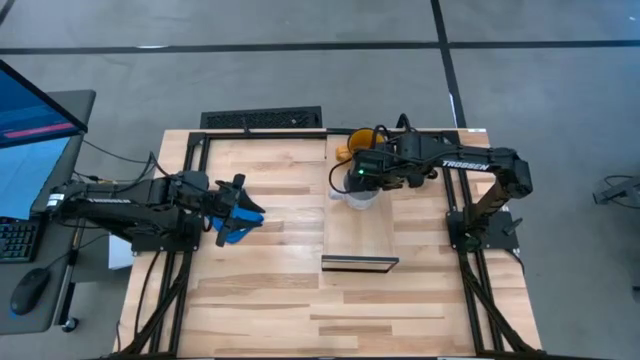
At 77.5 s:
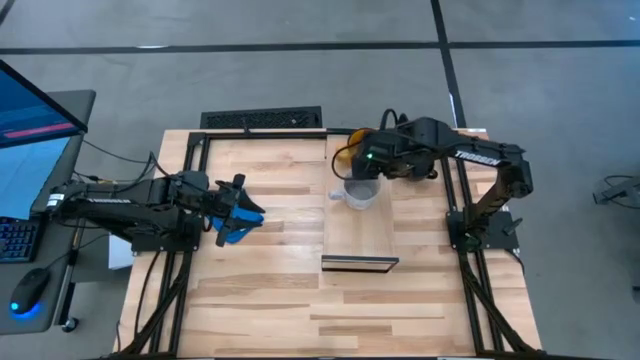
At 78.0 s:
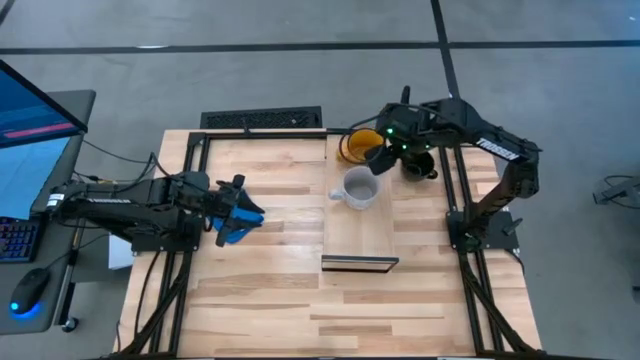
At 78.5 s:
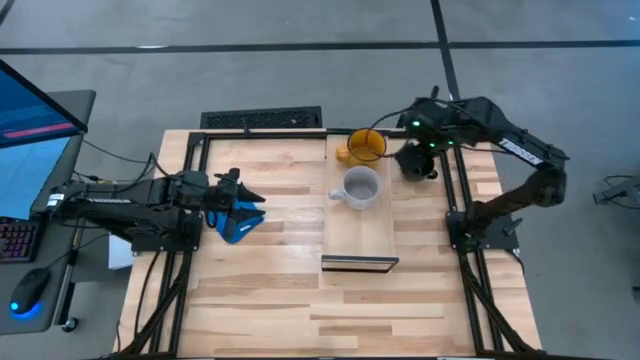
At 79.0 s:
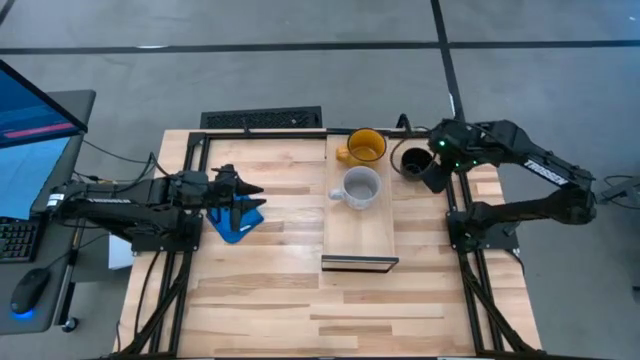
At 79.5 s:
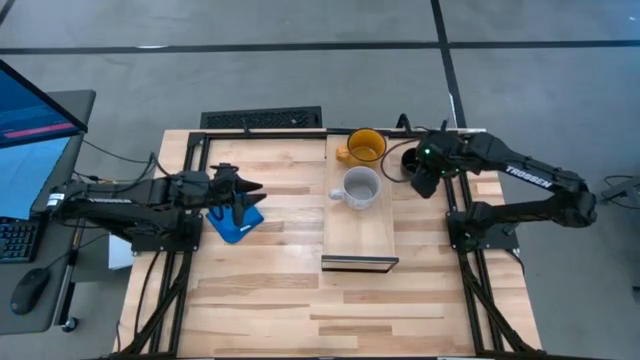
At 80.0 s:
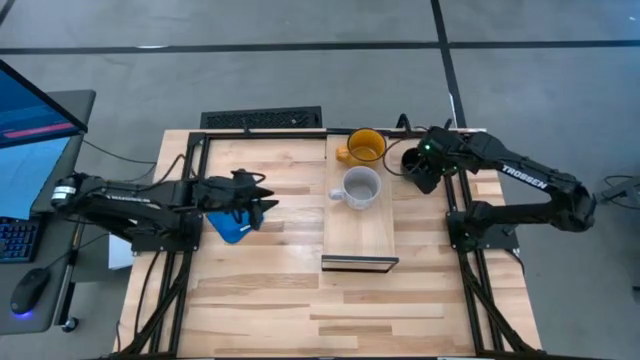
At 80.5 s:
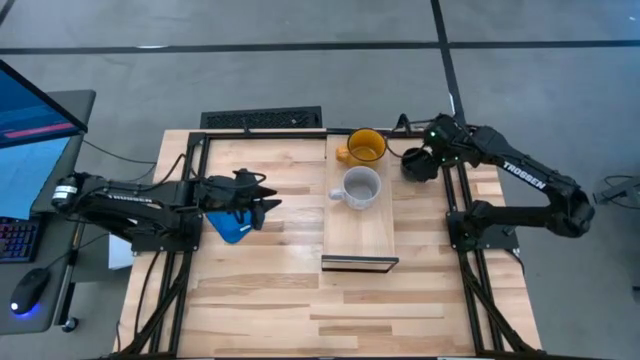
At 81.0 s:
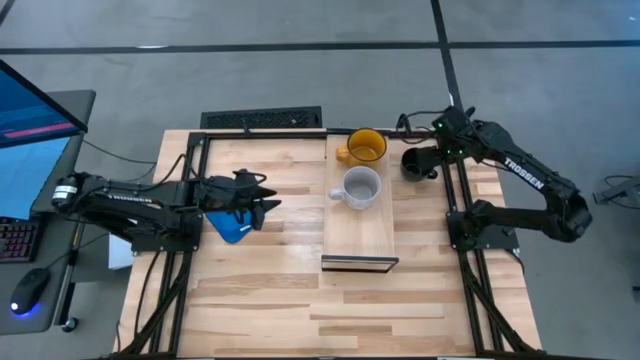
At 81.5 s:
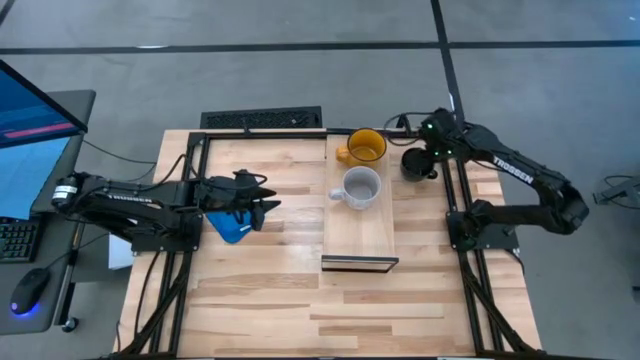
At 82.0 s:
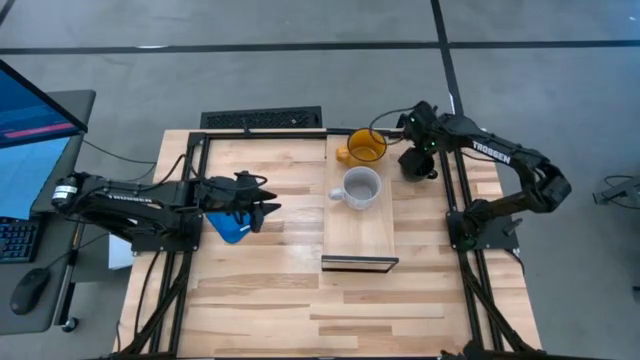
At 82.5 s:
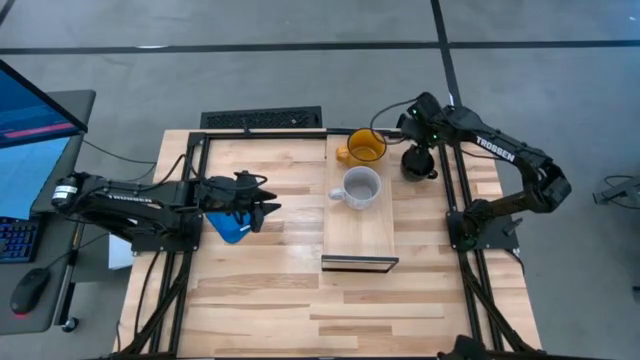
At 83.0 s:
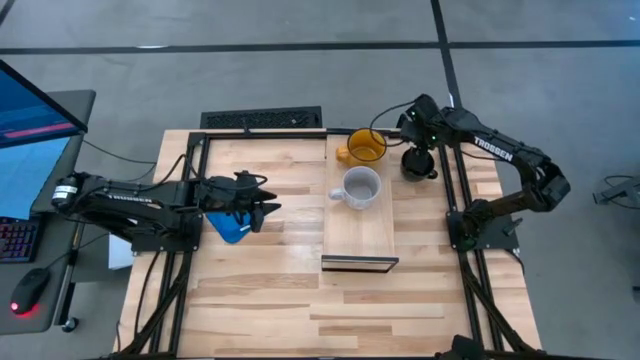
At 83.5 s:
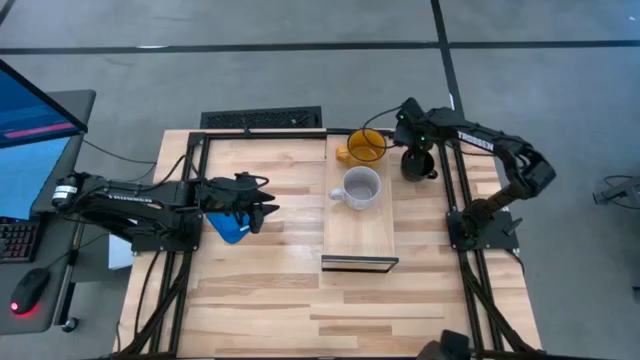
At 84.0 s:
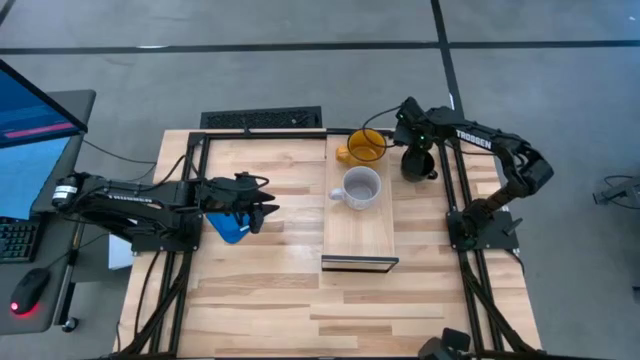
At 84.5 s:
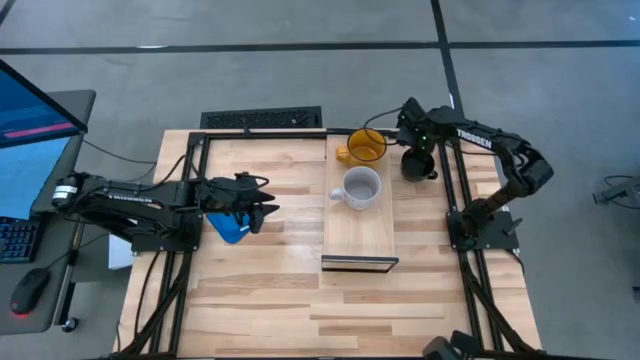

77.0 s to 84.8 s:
Task: Stack small to large cups/mugs on shelf
Put the black mug on the shelf

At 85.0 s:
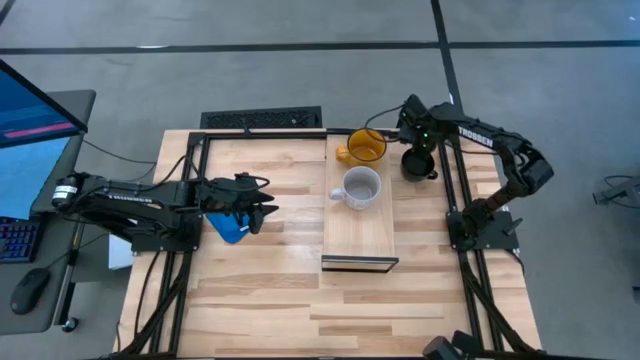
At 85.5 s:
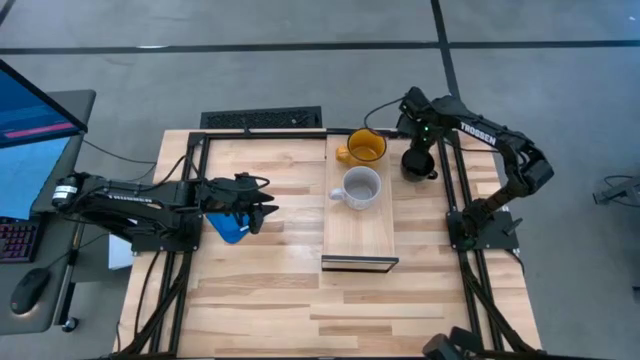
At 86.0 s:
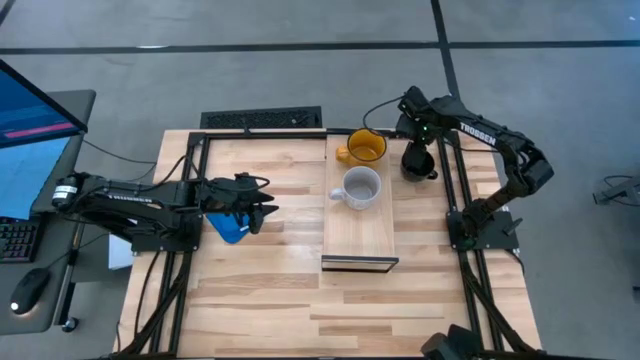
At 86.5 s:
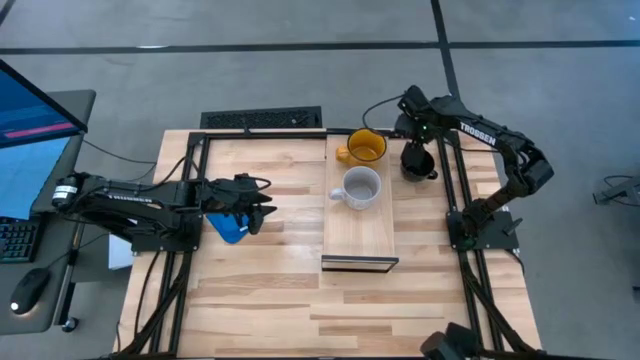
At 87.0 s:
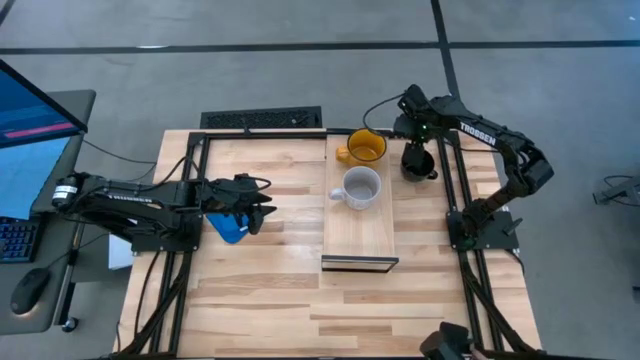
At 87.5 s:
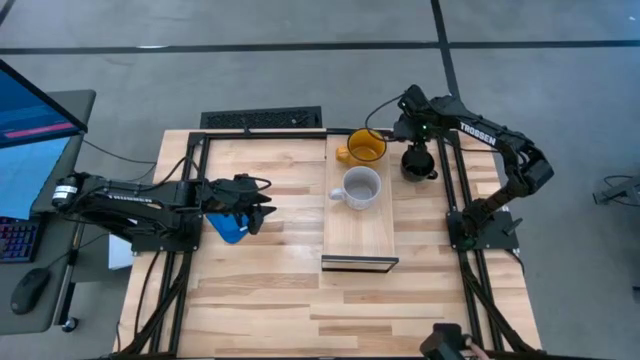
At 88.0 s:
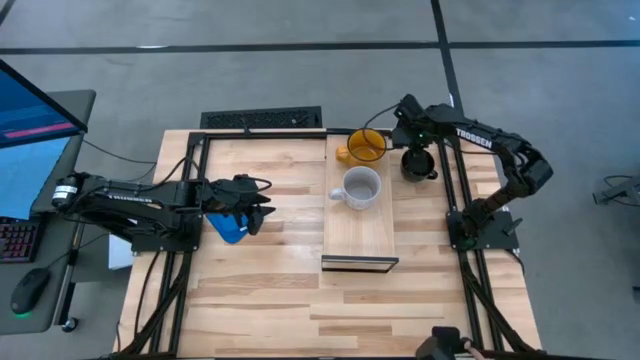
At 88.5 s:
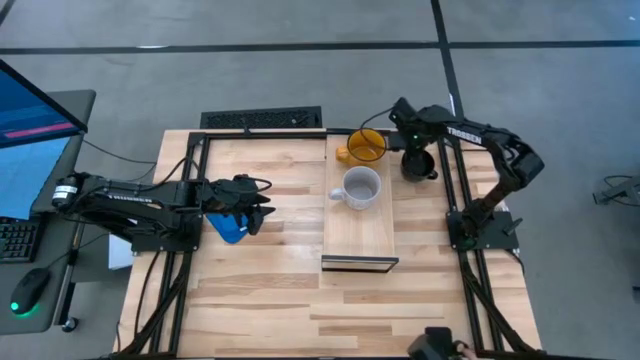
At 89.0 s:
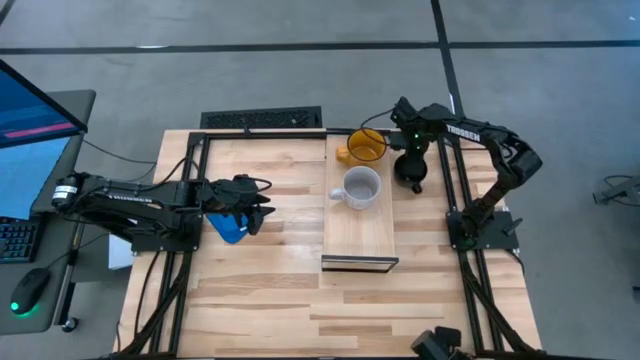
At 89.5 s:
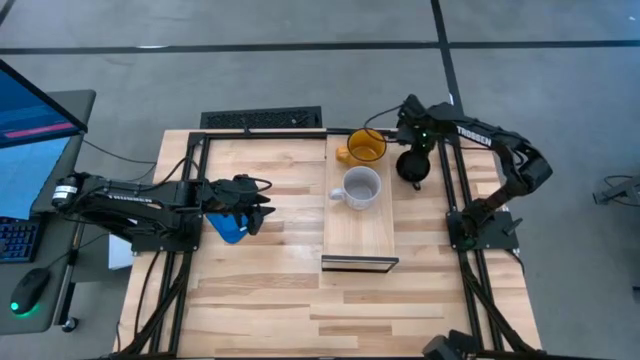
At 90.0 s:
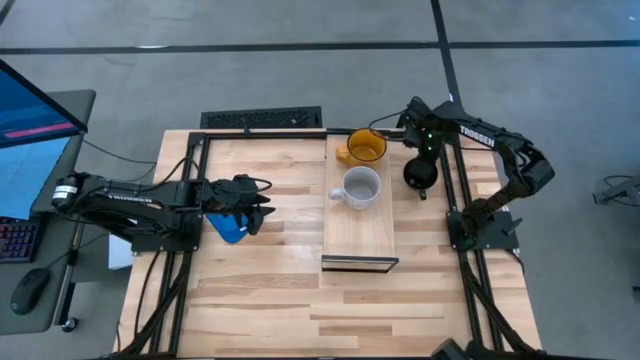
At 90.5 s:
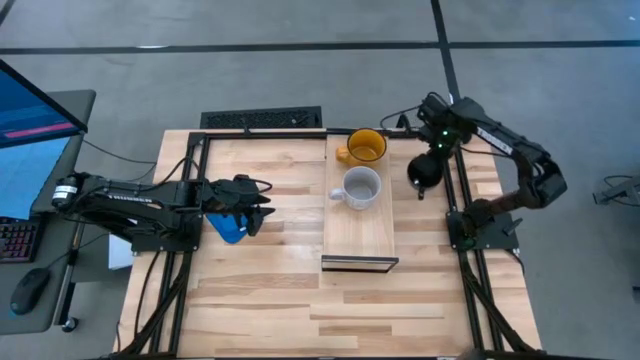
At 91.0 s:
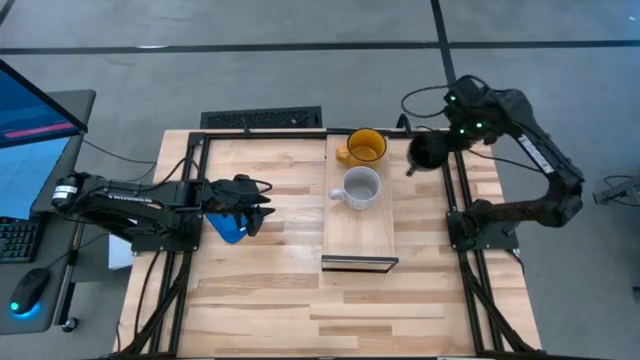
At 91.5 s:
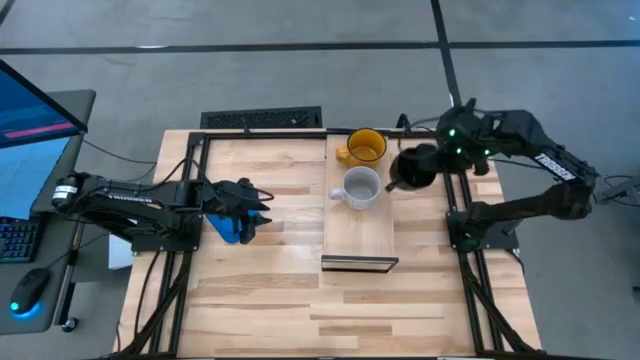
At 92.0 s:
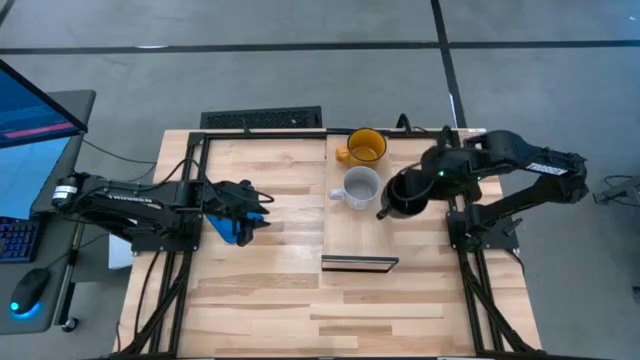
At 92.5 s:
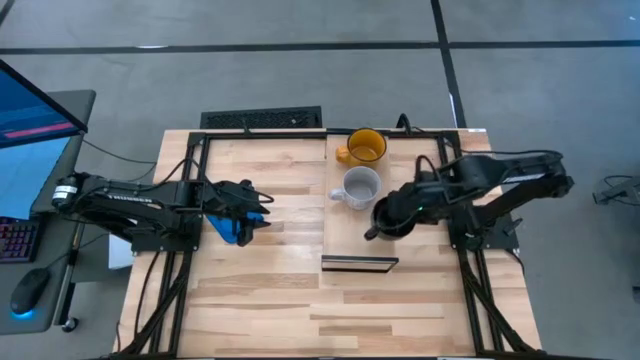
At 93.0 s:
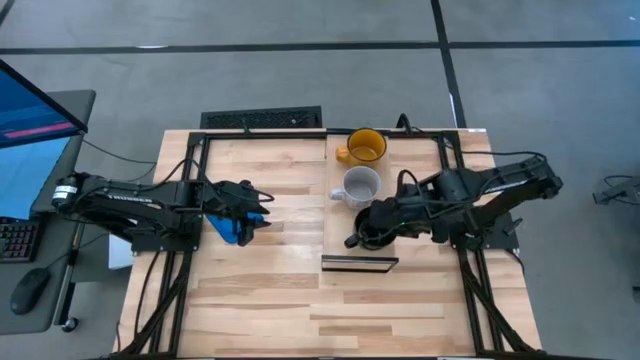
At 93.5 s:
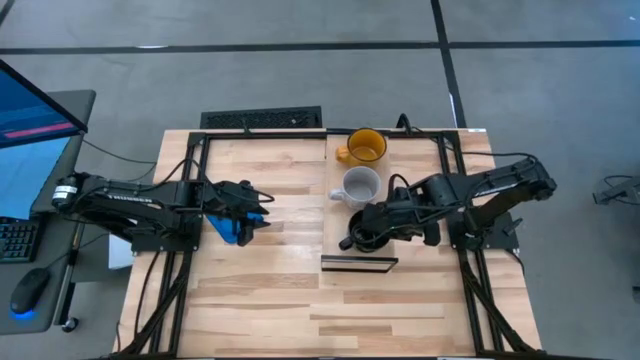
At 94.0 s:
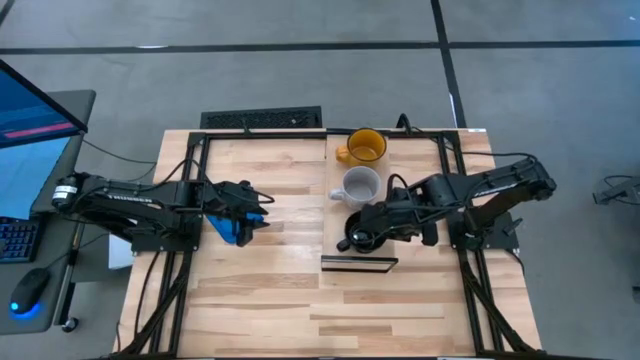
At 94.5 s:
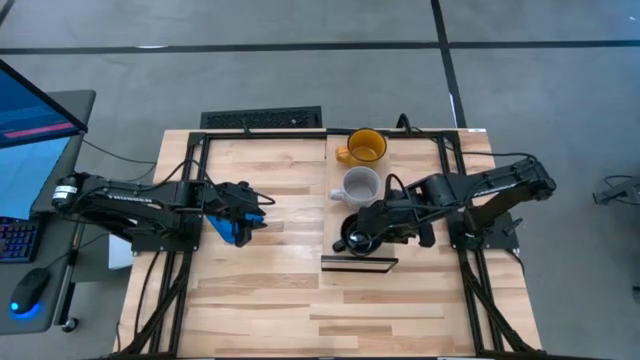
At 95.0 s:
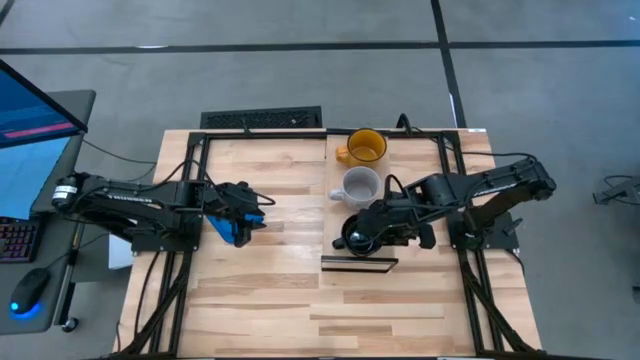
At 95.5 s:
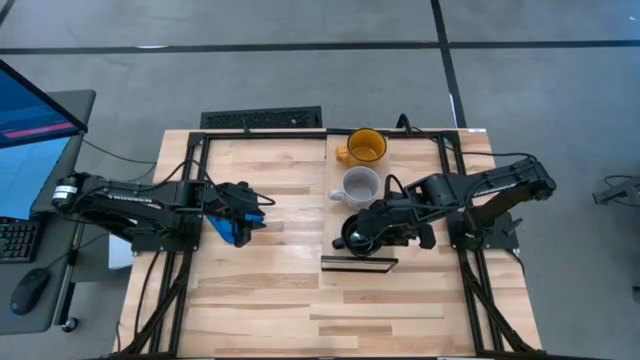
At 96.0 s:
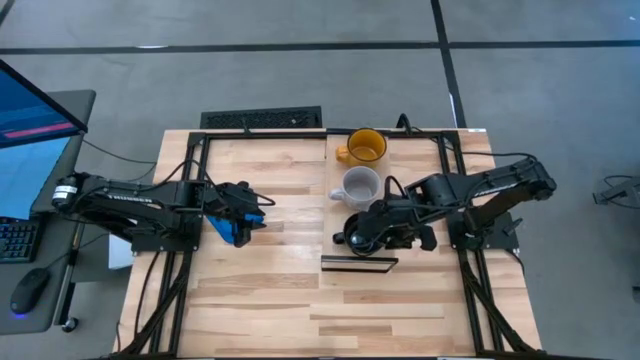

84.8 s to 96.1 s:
Put the black mug on the shelf

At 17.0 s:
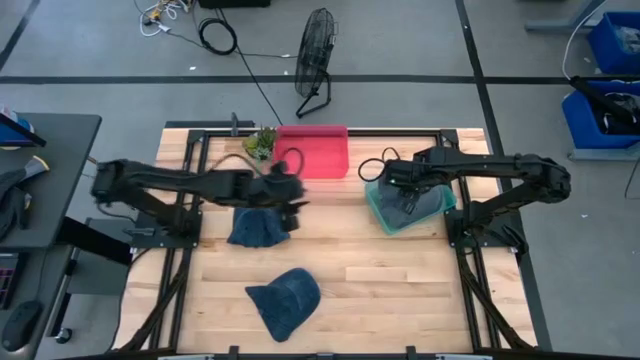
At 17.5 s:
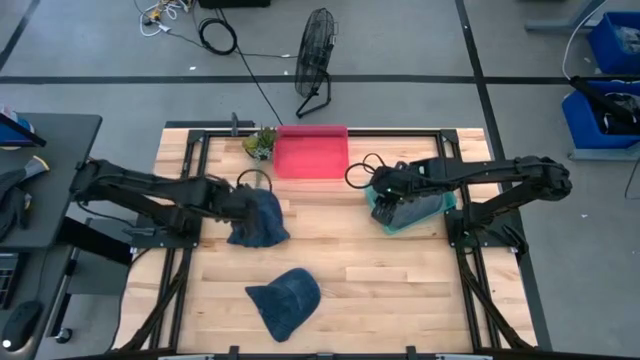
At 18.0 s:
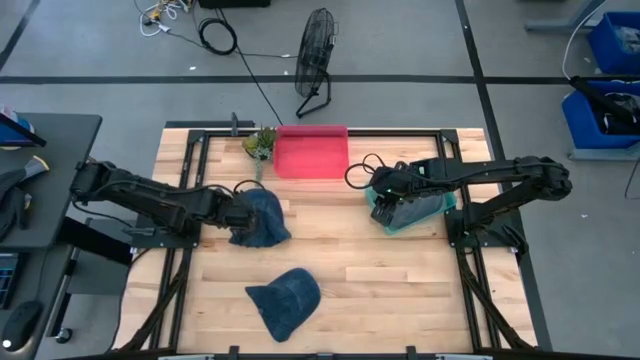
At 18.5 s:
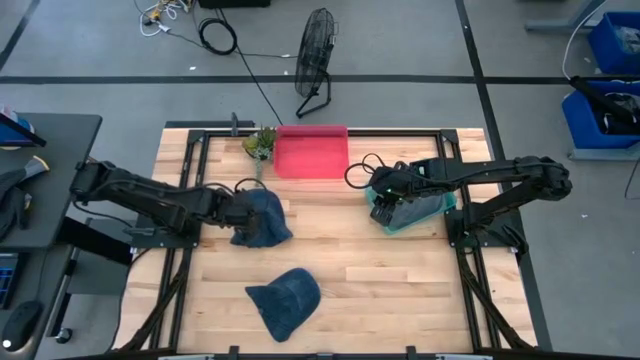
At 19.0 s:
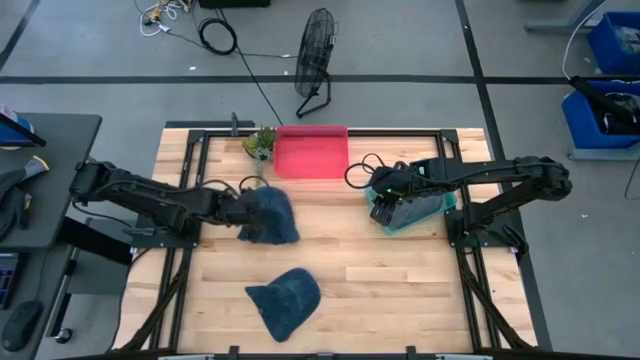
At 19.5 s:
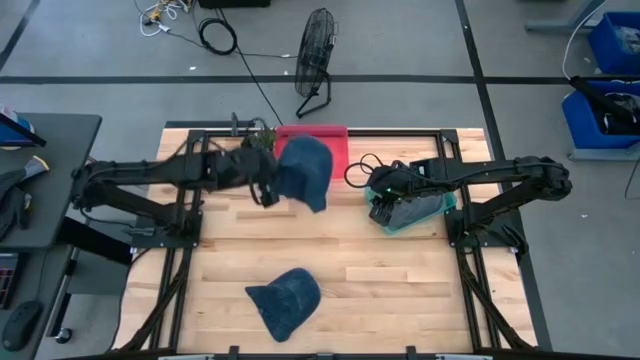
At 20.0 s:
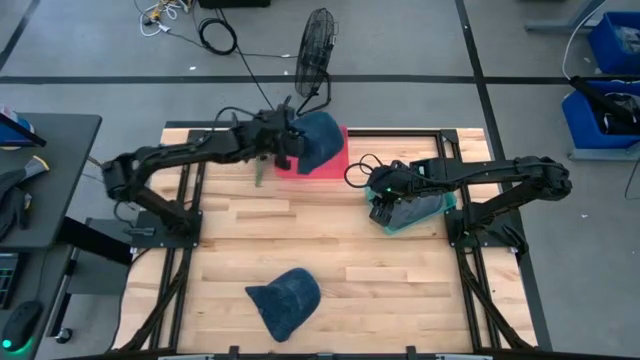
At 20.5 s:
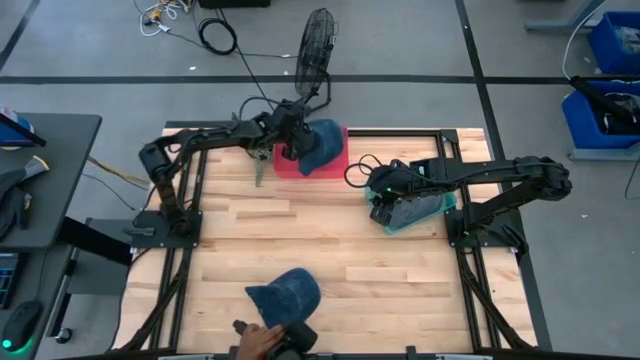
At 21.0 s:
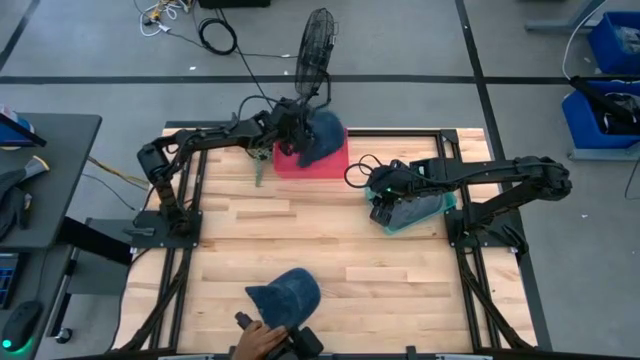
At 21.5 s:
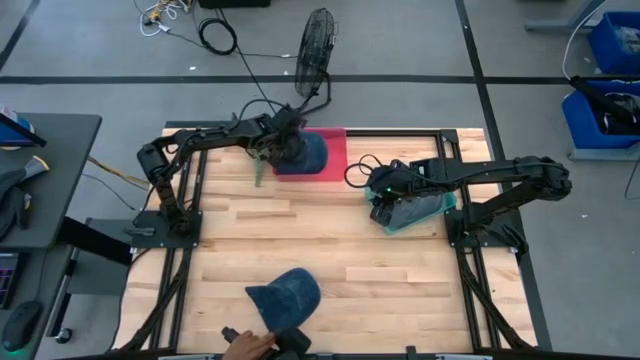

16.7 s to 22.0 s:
Task: Pick & Place hat
Put the top blue cap into the red bin
